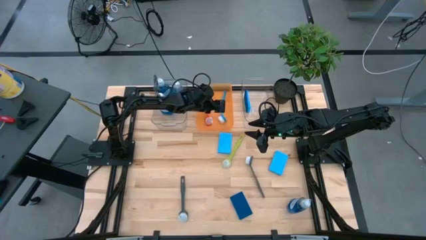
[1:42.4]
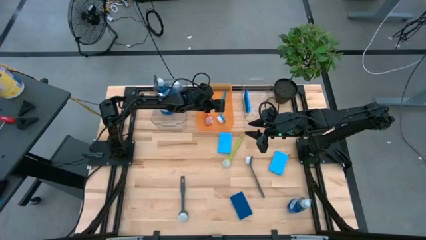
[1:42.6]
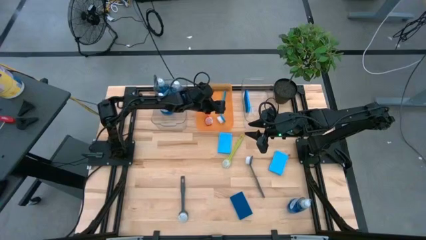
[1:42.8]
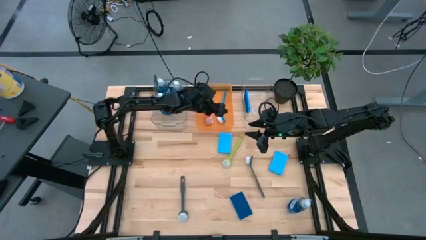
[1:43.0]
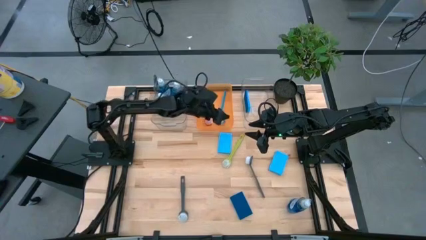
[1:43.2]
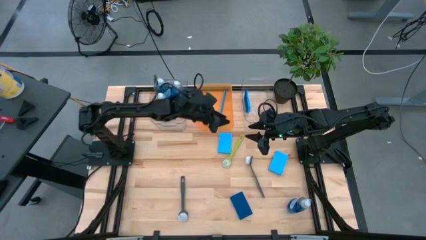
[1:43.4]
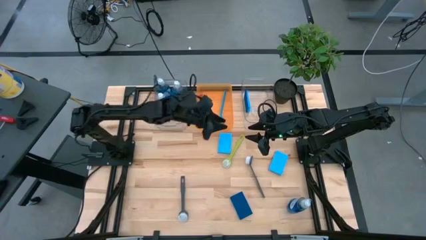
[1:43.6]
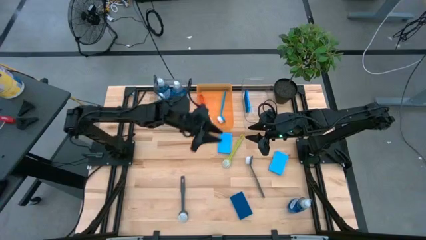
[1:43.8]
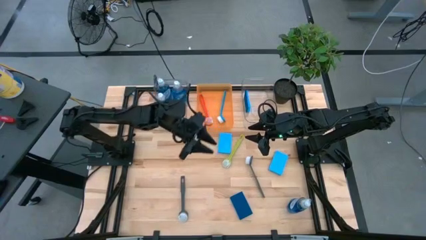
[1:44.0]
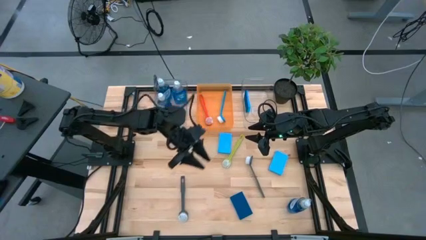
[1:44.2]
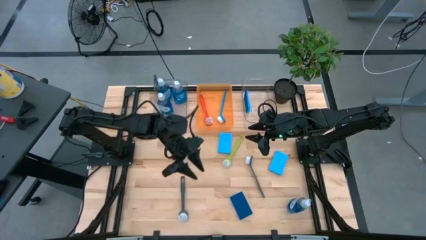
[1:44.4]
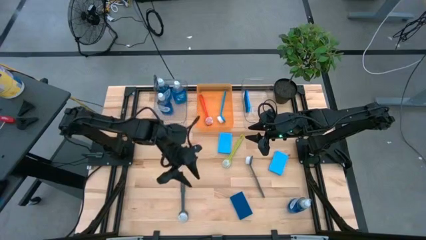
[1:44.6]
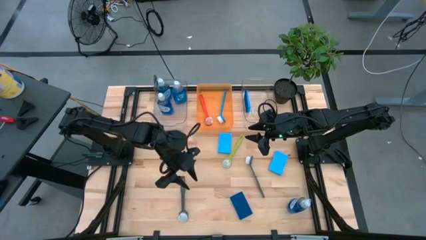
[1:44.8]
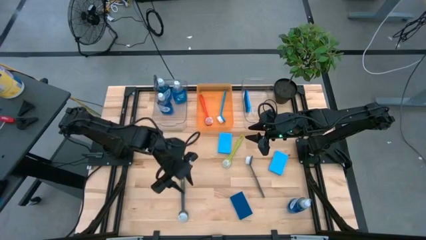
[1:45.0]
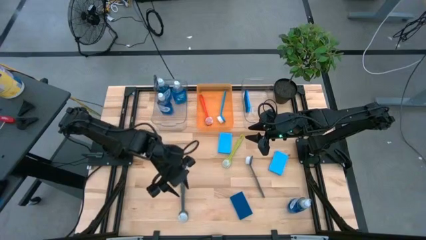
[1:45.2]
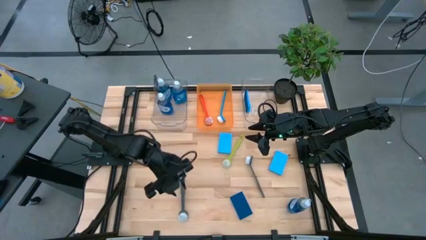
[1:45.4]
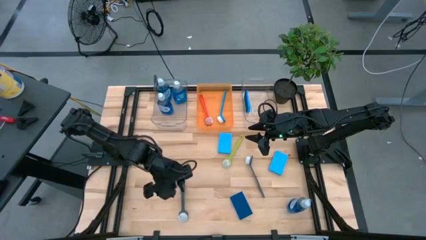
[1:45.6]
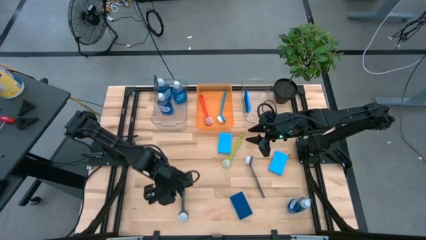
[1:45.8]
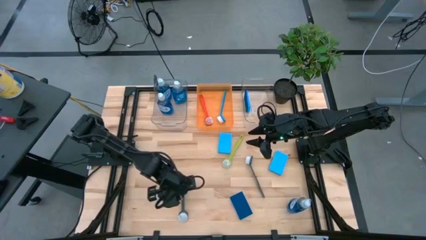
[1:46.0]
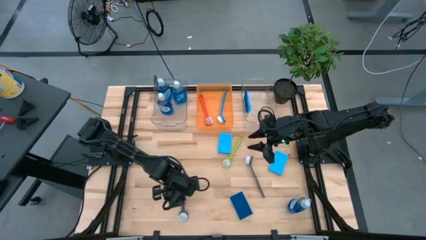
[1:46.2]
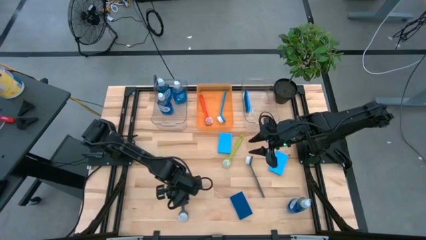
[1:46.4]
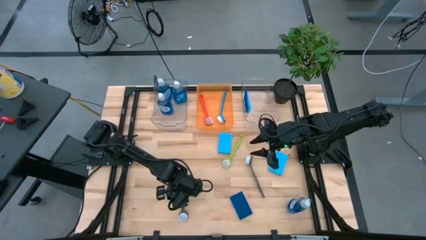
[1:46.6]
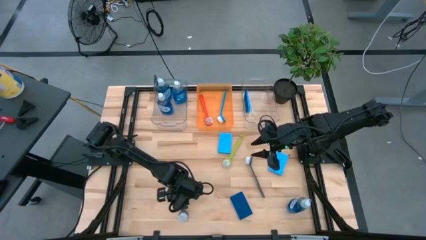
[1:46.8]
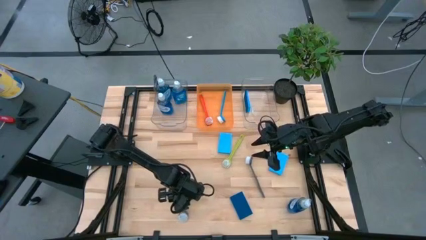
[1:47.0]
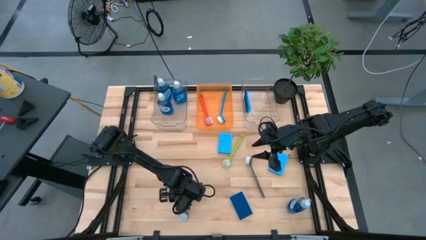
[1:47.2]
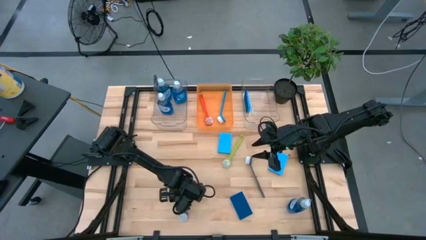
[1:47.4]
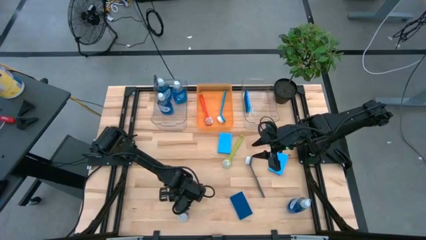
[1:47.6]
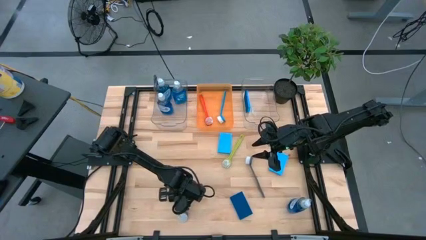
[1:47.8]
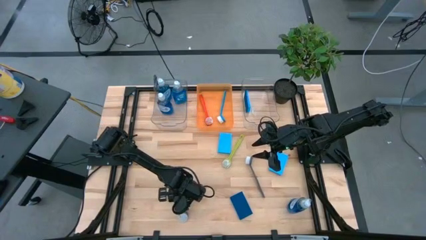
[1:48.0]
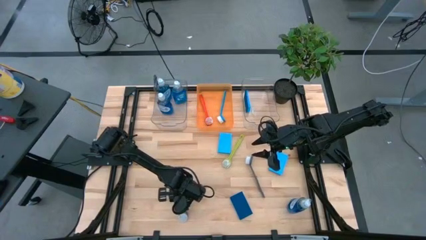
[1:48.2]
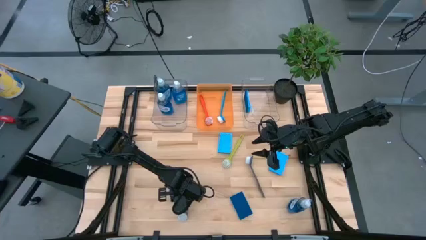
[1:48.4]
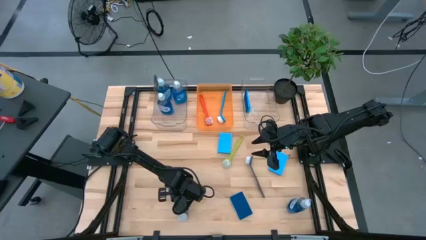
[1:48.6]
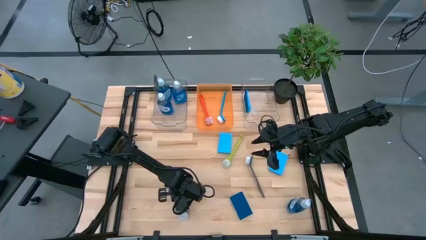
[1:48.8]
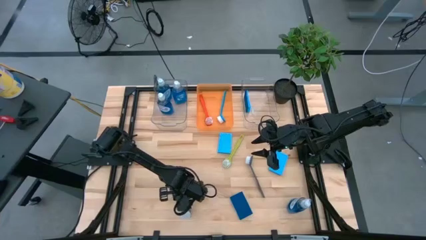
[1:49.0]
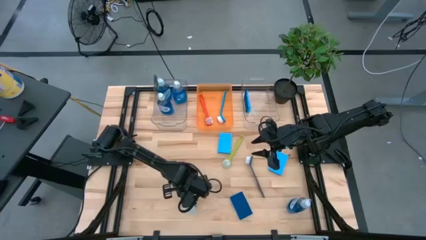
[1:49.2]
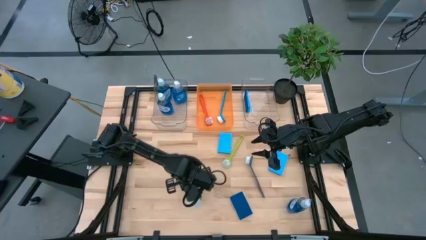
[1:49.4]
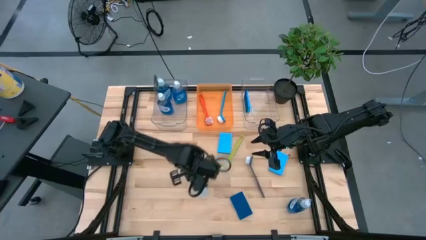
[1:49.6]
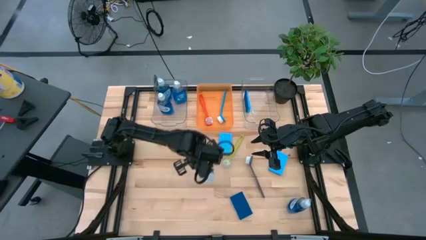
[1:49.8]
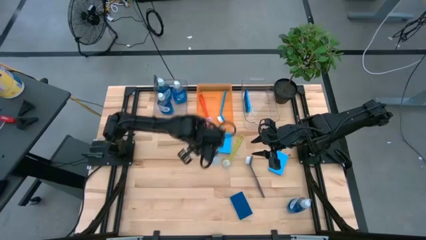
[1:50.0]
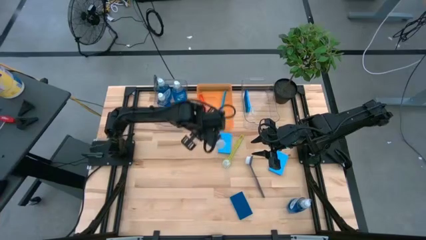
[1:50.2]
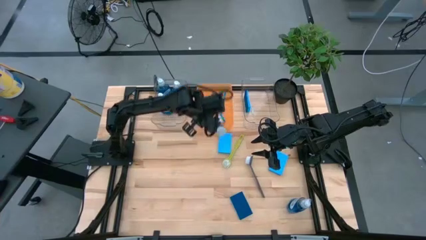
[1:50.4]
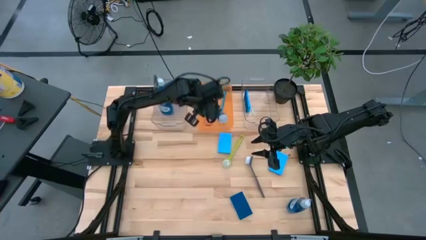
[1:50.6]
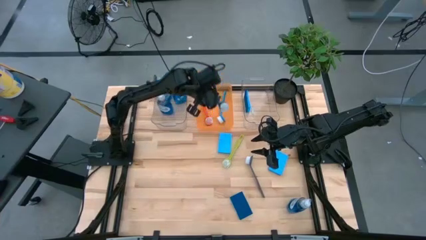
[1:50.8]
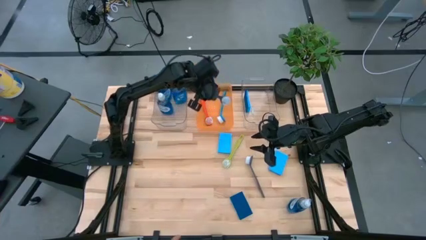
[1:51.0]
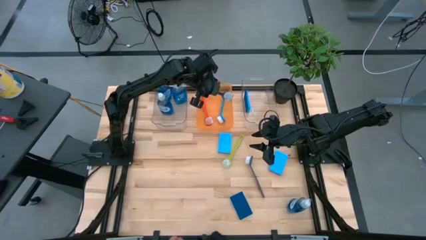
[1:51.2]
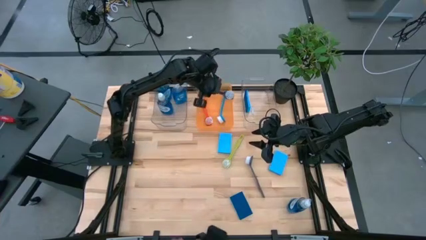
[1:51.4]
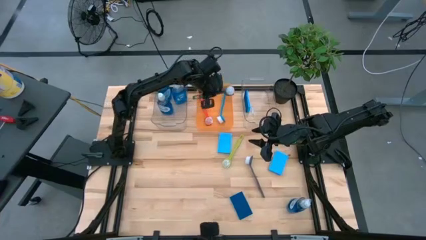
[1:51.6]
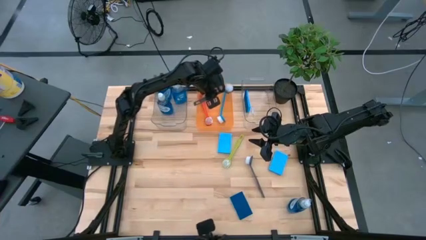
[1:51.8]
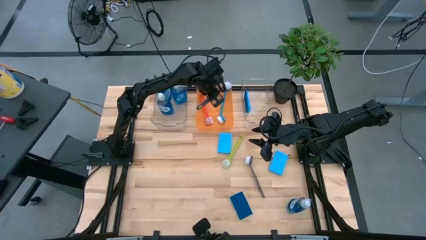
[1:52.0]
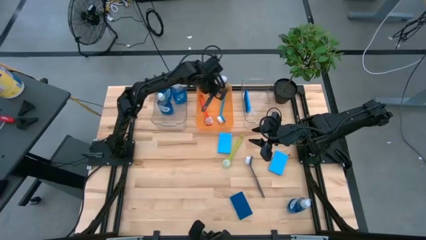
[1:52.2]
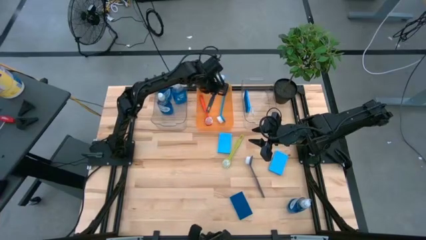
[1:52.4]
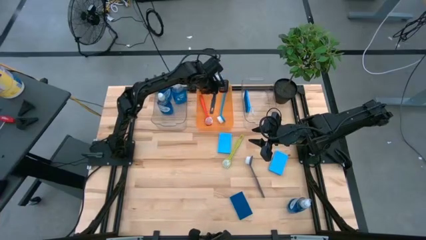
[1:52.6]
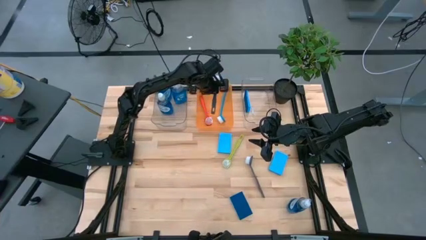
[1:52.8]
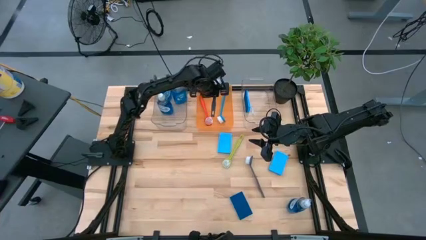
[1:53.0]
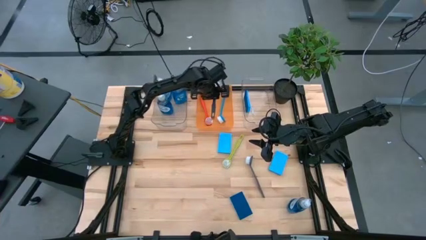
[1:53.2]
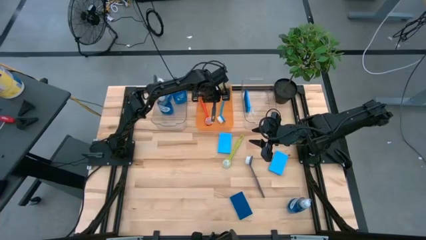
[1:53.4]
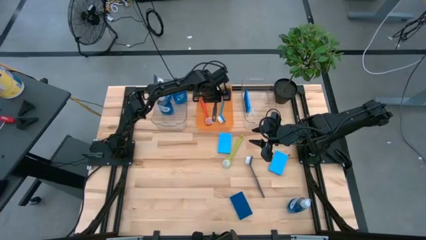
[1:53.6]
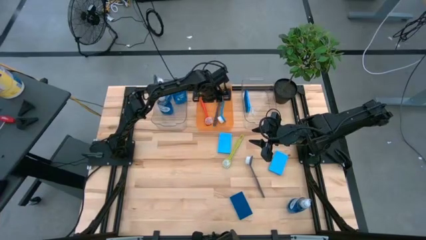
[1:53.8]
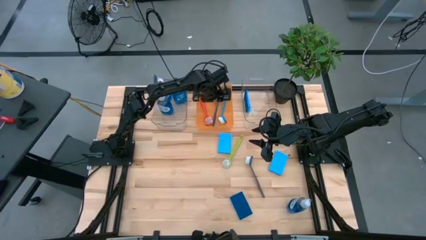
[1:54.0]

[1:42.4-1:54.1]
Task: Pick & Place Kitchen Sink Supplies
Put the gray dish brush into the orange bin
